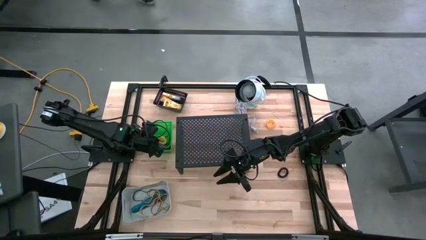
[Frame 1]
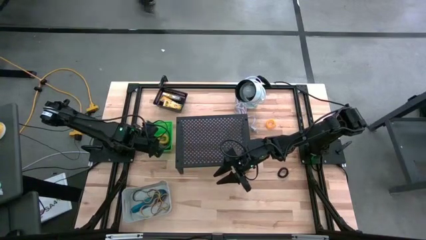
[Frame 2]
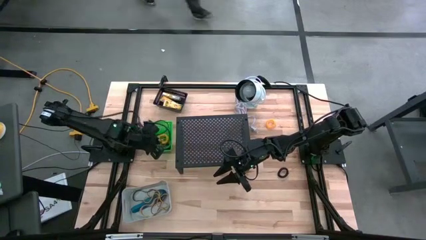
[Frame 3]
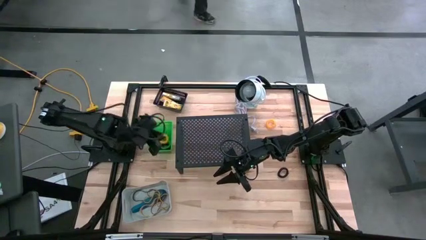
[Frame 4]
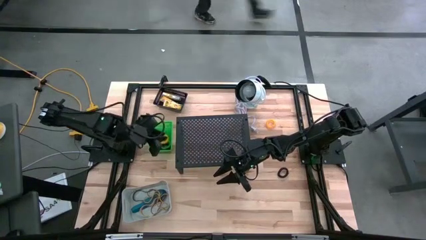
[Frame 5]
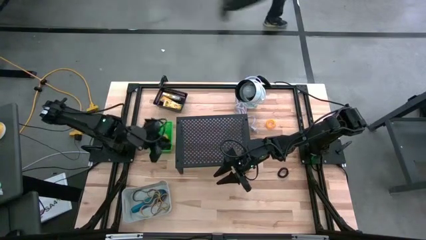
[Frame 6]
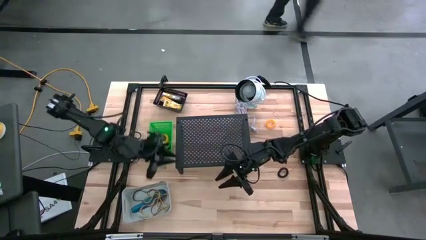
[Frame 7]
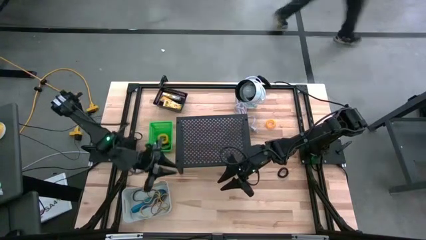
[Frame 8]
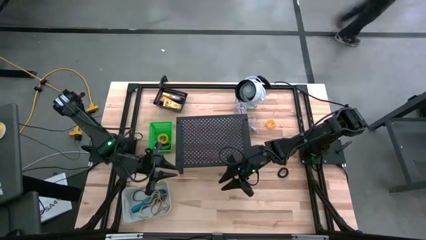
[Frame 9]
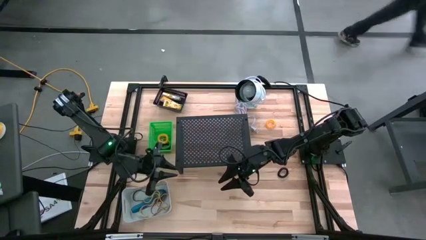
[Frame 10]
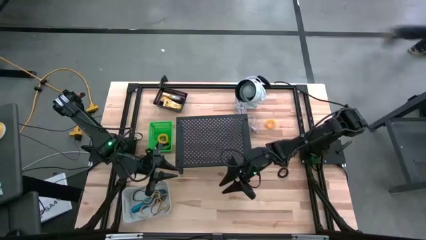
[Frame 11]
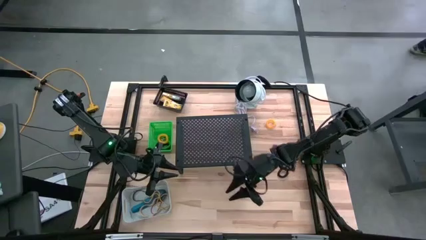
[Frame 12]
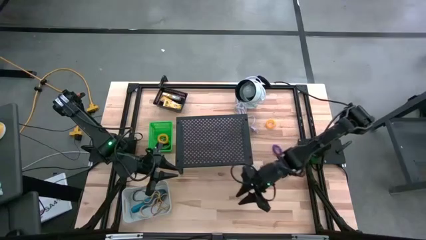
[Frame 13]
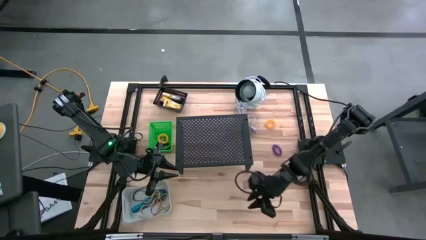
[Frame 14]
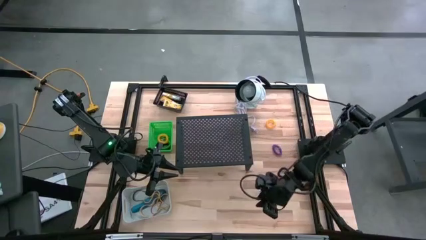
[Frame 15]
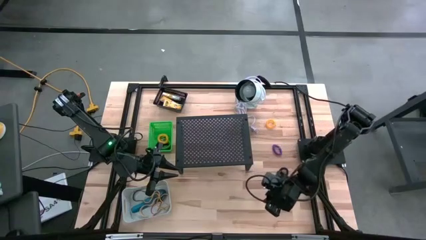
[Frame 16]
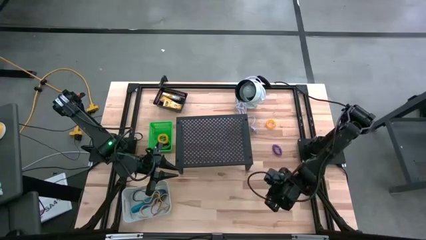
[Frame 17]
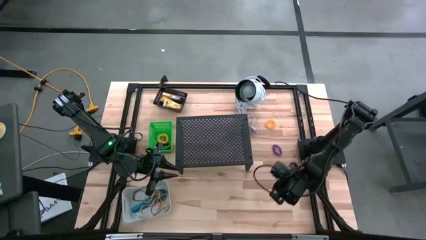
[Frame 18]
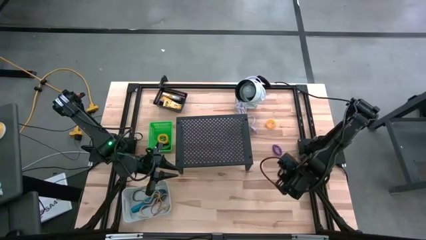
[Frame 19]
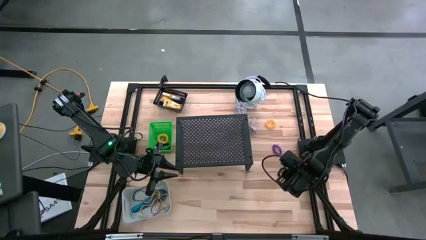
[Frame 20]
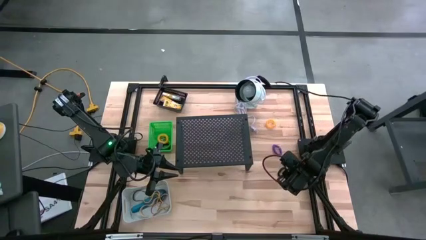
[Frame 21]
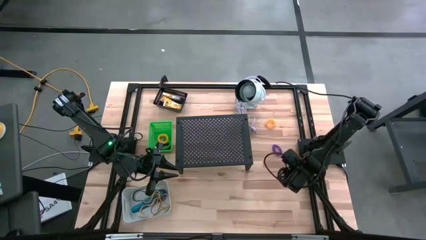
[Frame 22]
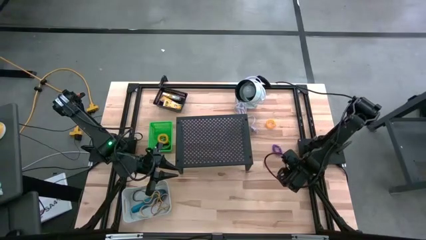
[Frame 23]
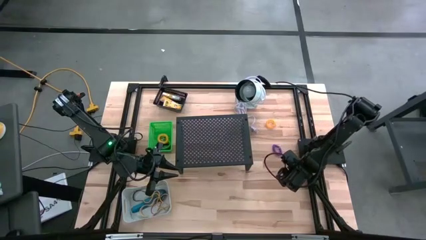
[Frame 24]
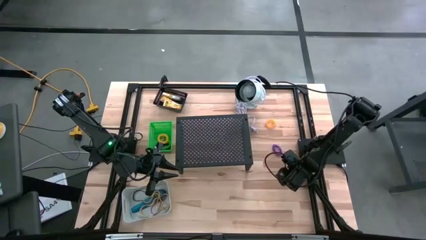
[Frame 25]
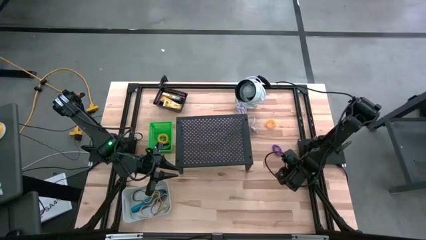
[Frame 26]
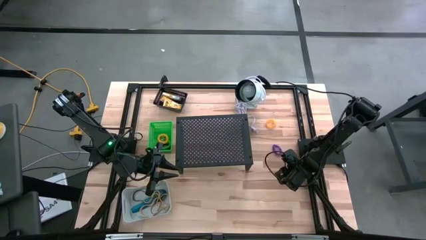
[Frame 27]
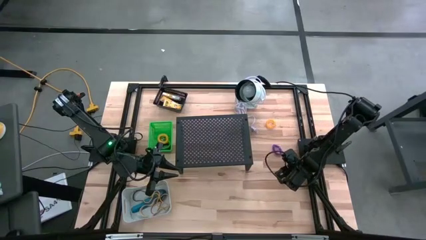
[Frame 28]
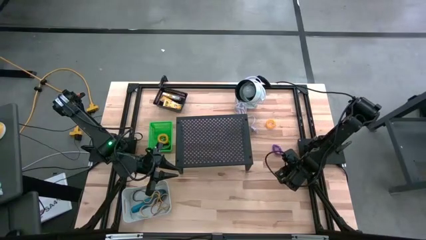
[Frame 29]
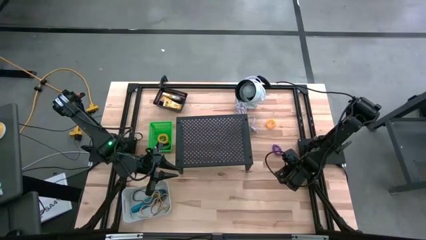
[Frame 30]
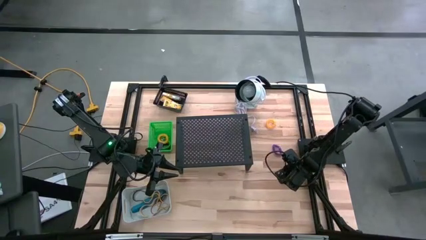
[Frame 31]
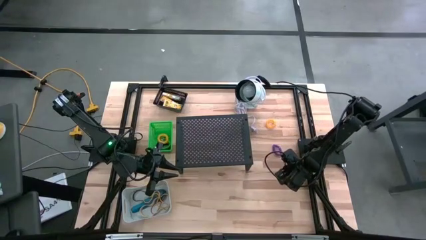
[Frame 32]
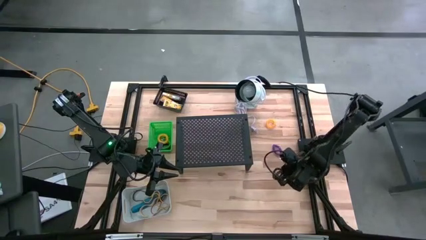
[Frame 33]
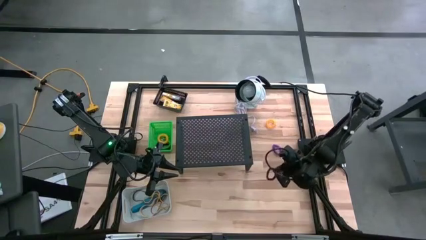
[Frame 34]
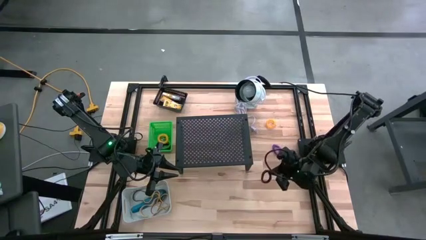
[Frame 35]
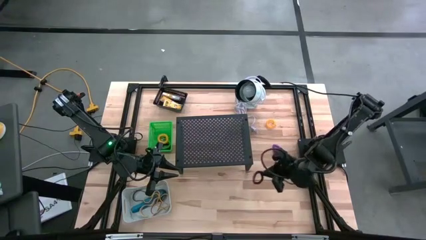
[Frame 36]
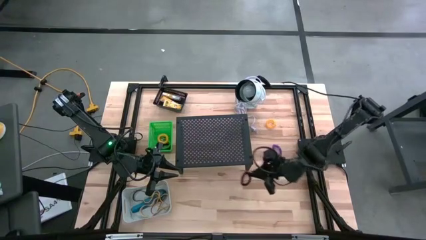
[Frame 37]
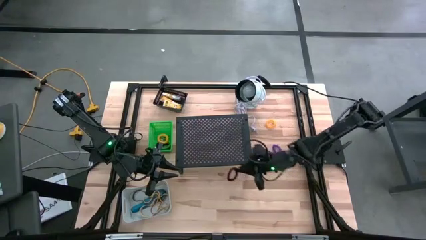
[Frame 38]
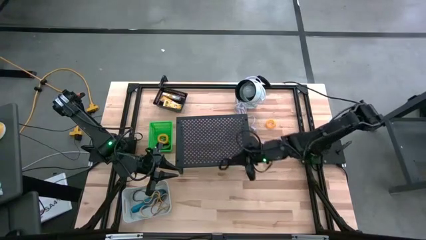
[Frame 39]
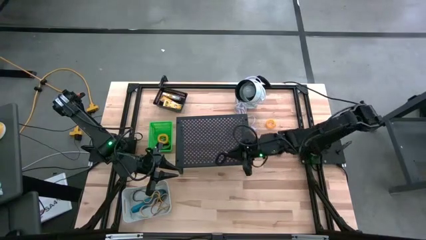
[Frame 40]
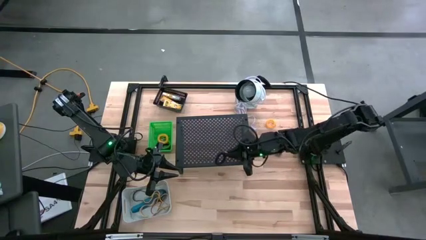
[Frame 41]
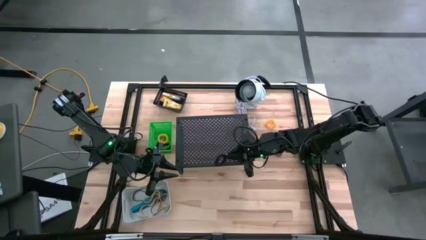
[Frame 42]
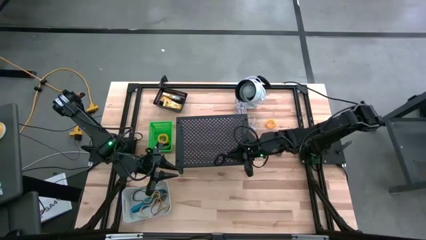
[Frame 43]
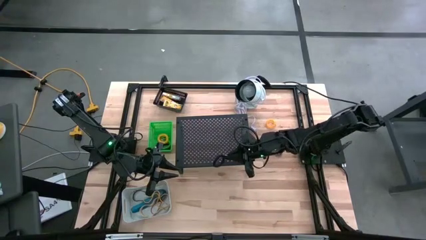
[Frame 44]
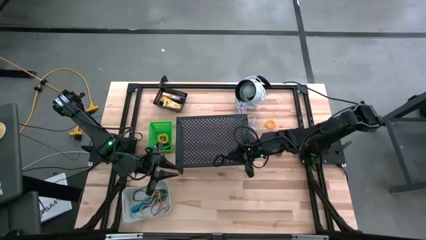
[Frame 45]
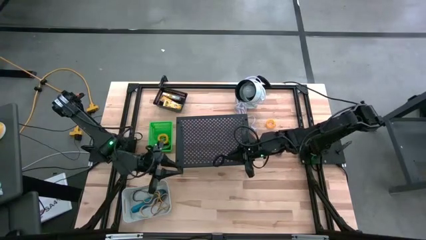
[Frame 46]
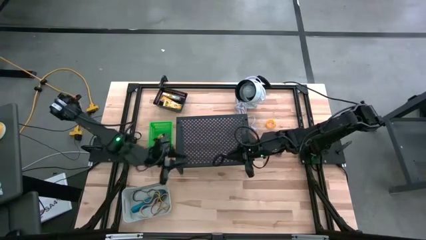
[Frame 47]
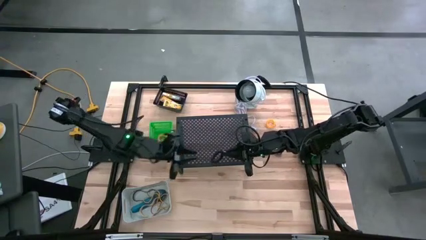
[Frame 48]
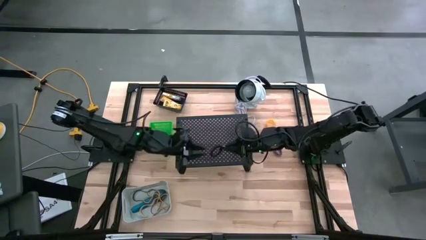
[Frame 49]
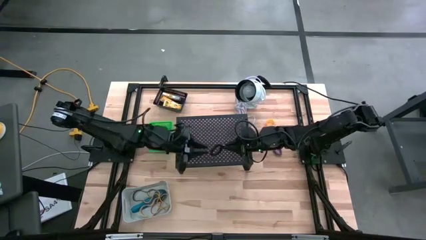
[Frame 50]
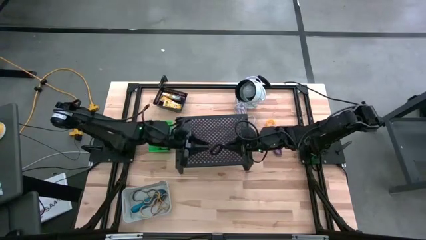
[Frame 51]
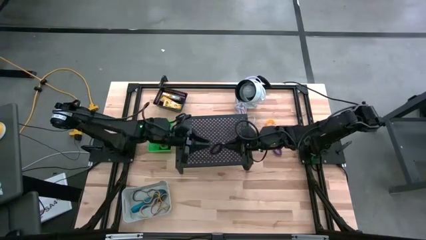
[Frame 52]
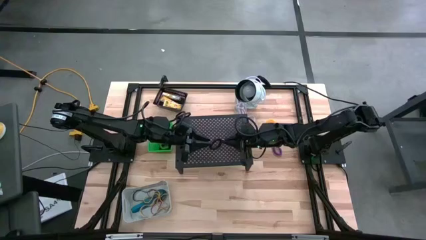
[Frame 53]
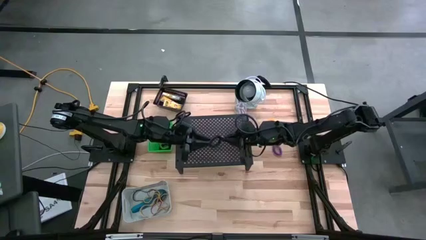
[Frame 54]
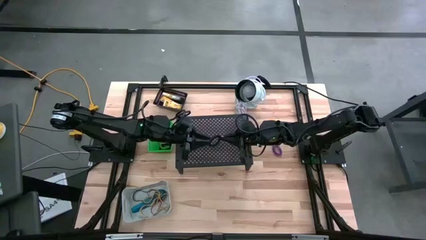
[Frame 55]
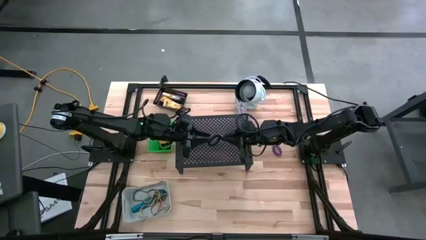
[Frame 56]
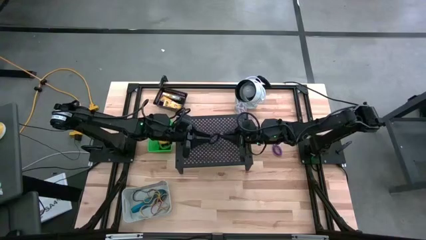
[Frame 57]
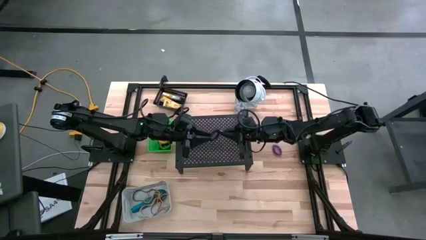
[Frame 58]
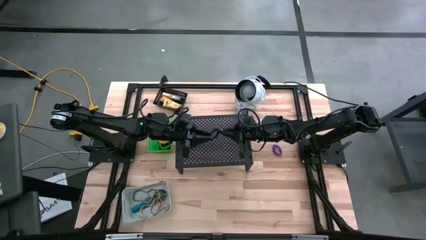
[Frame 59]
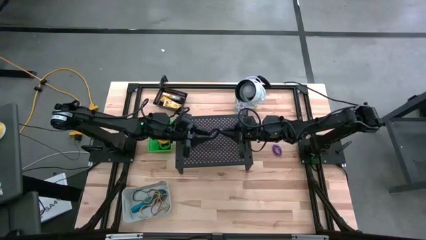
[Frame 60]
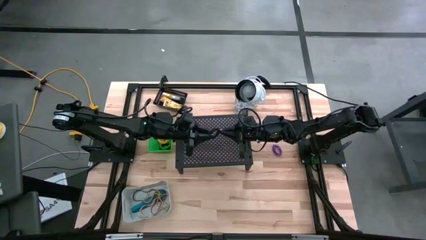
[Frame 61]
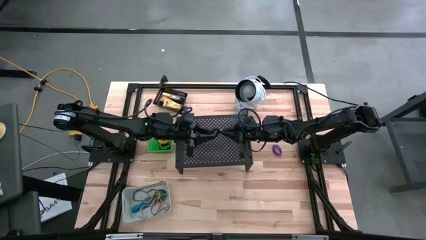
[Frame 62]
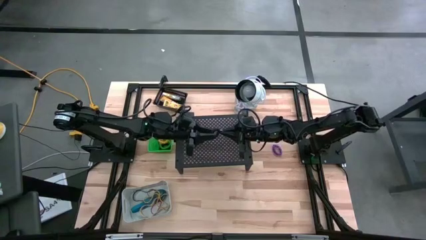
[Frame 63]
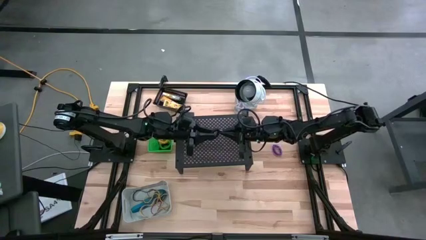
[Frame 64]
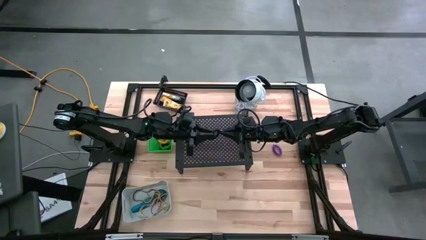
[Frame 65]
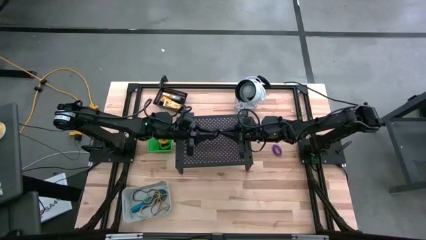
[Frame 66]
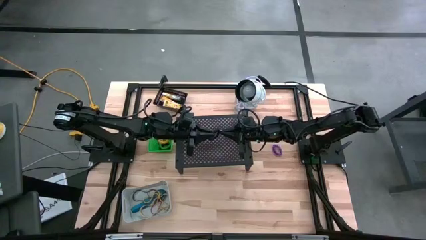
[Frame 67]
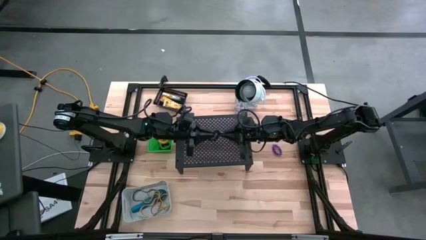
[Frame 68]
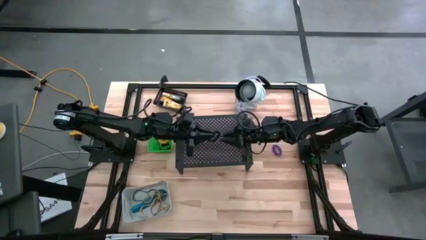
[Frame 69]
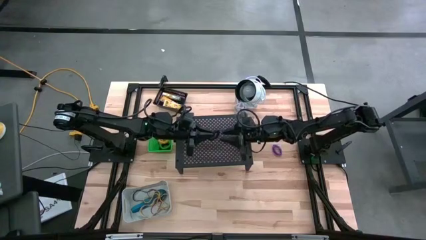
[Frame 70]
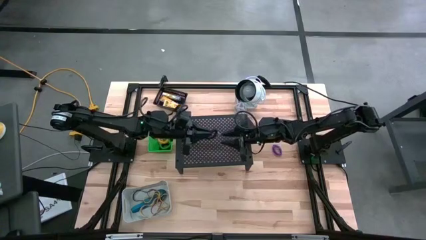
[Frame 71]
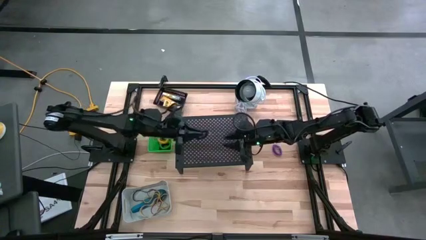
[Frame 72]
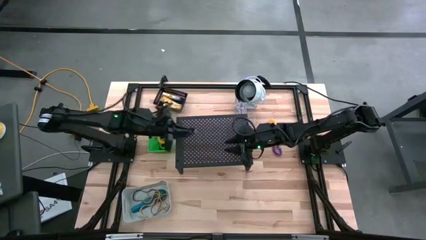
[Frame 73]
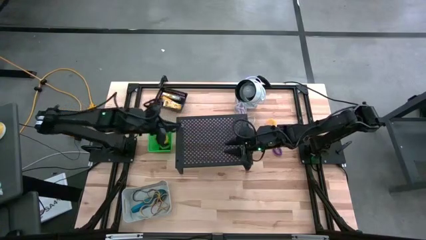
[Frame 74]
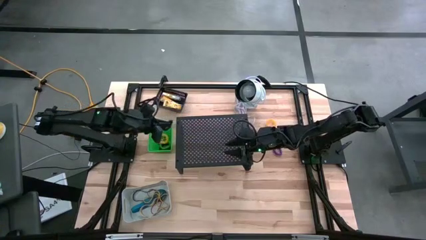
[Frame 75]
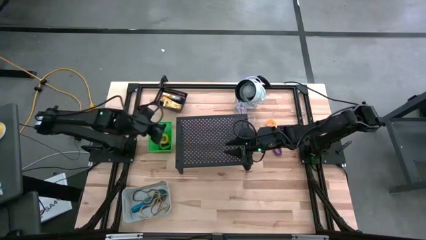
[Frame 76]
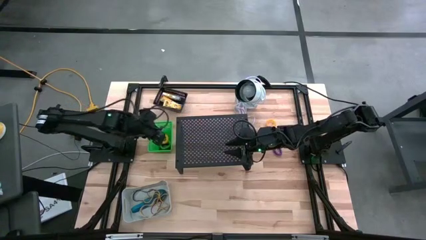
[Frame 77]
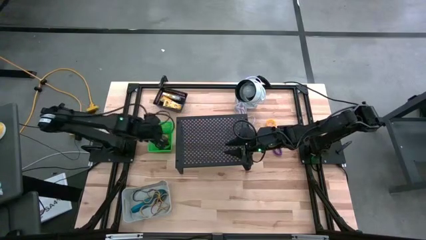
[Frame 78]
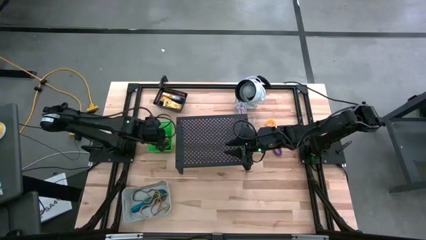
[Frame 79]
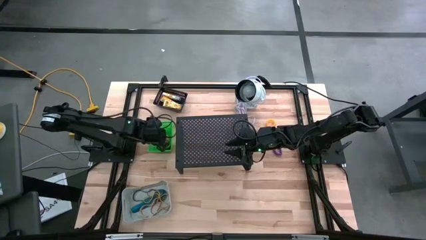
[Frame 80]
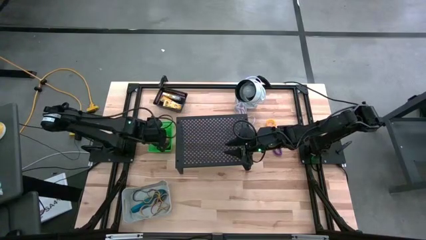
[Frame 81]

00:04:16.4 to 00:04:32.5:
Task: Pick & Place Office Desk Supplies
Put the black spring keychain into the green bin

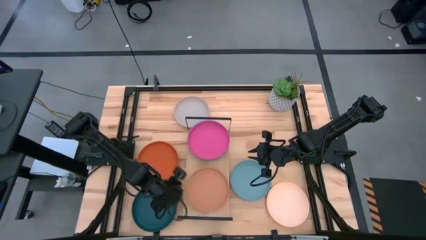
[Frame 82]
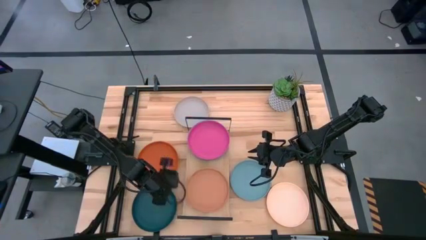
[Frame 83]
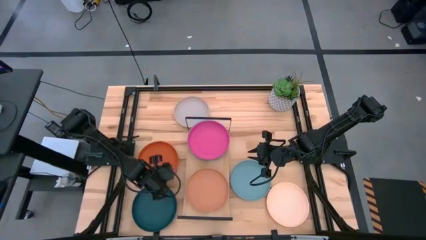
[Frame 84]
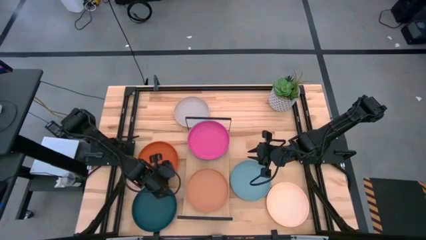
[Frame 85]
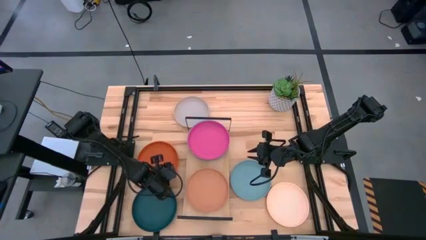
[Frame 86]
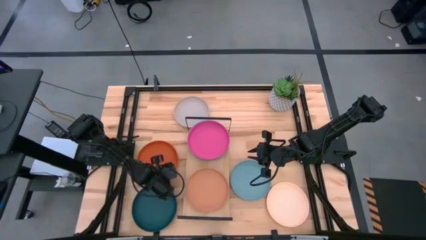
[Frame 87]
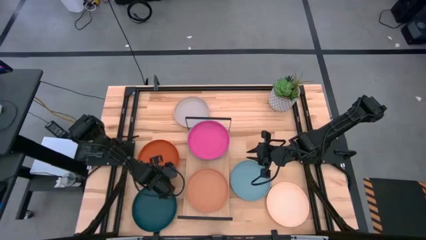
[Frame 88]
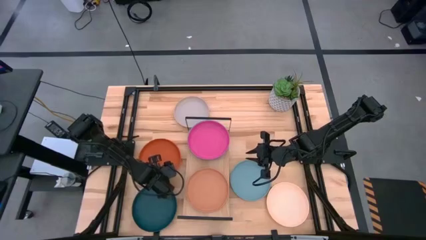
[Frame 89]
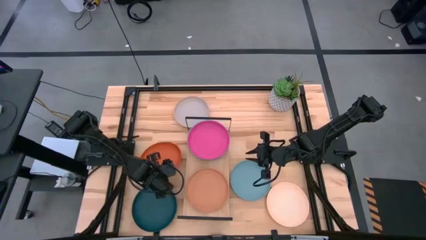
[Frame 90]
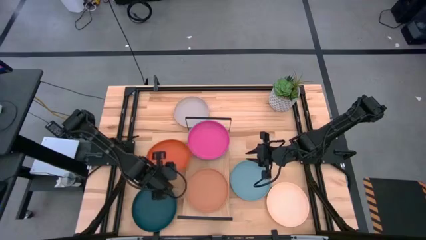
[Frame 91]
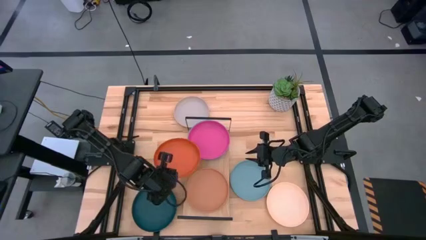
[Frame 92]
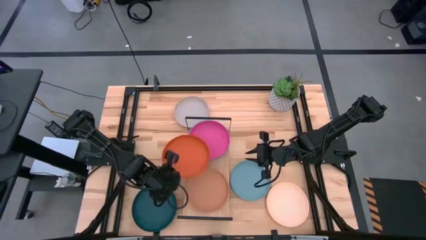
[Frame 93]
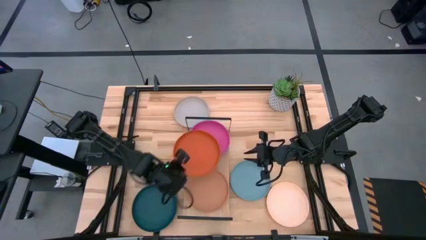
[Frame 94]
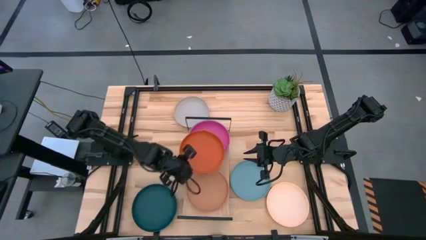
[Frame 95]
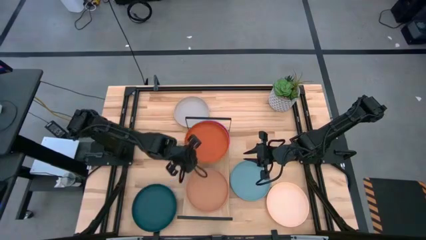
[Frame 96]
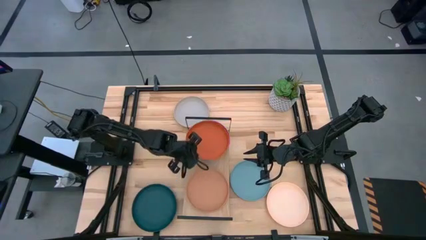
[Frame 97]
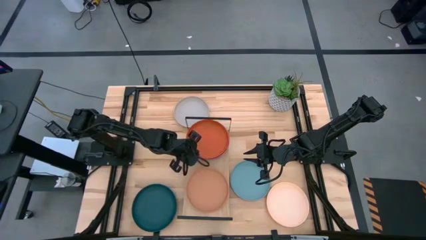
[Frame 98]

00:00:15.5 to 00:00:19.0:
Task: Place and stack plates onto a shelf
Stack the orange plate on top of the pink plate on the shelf
